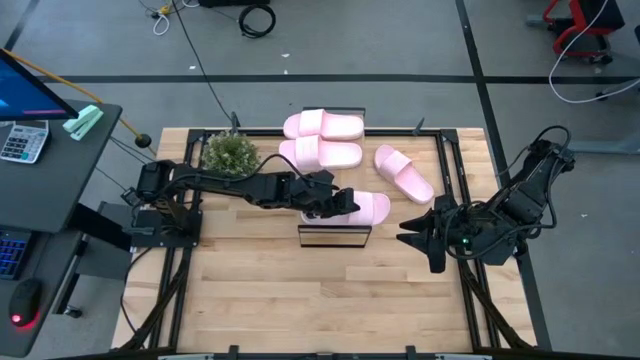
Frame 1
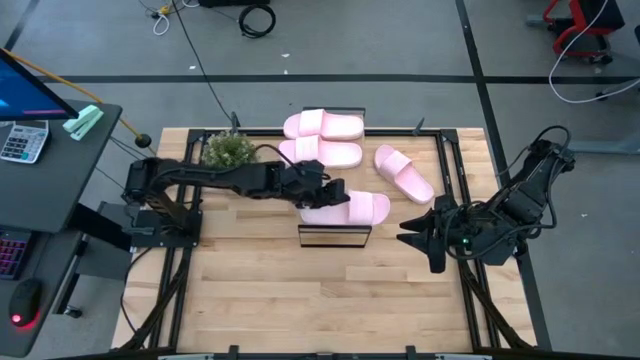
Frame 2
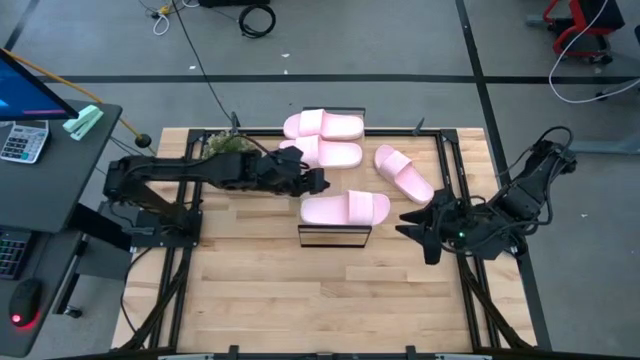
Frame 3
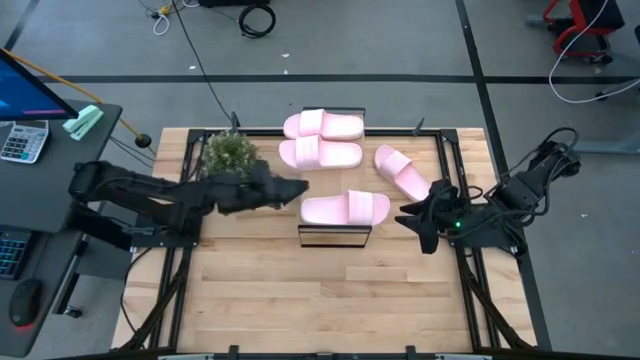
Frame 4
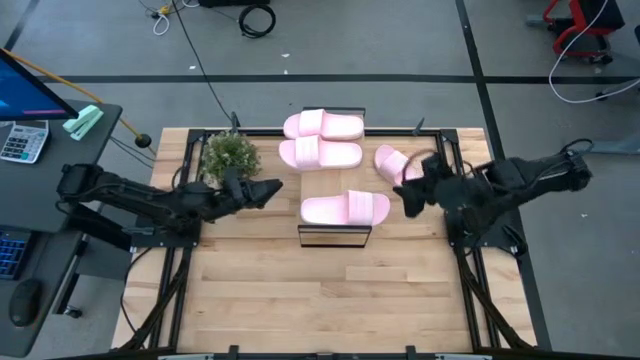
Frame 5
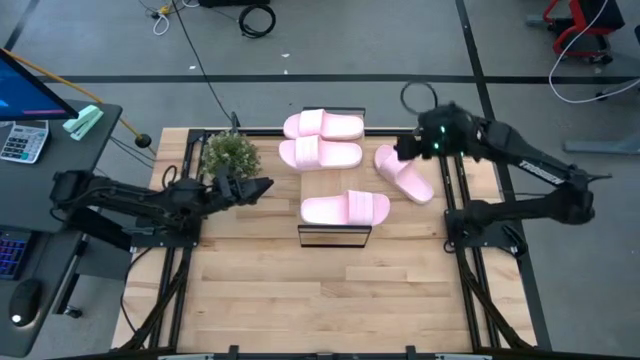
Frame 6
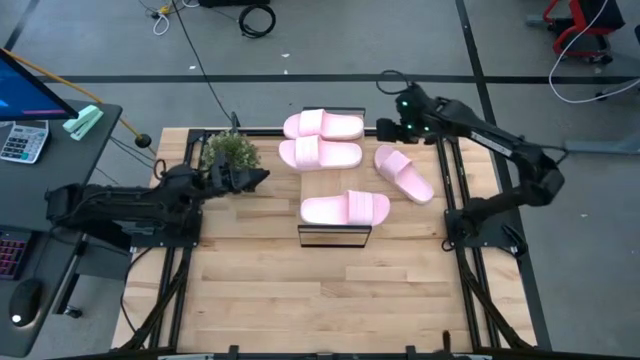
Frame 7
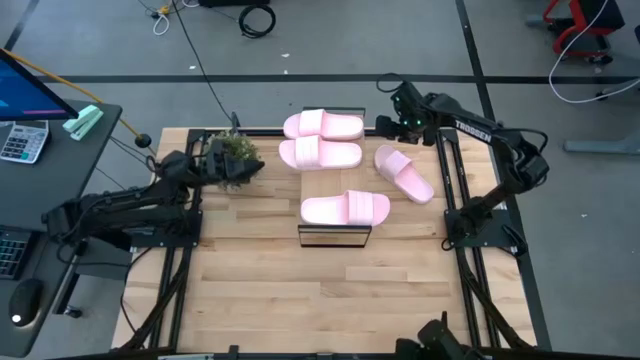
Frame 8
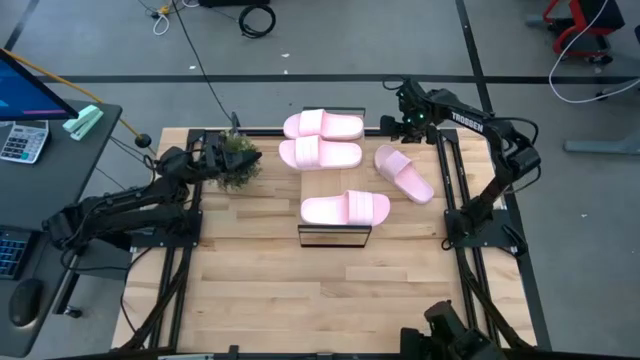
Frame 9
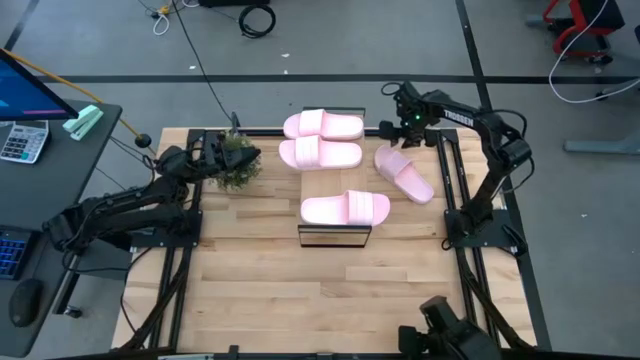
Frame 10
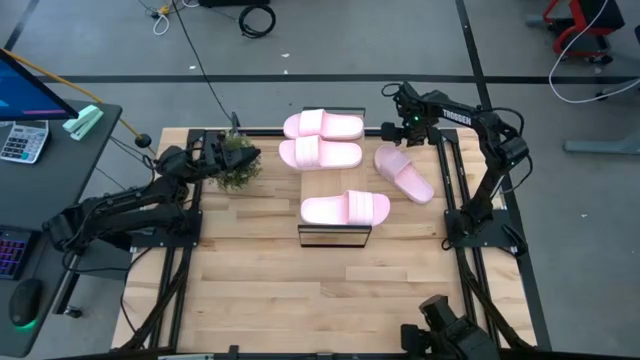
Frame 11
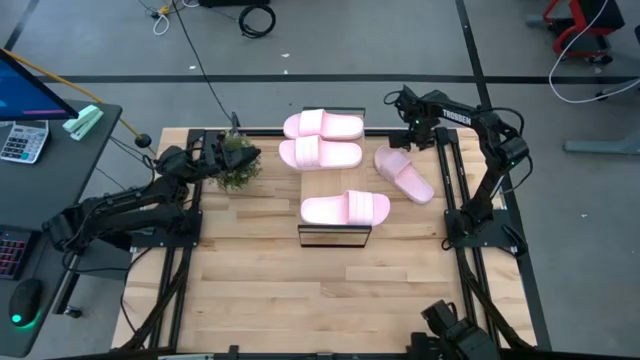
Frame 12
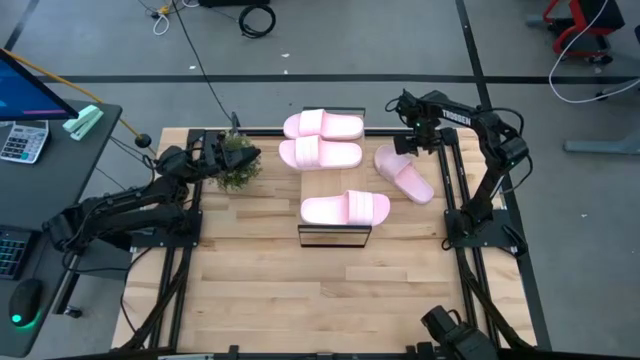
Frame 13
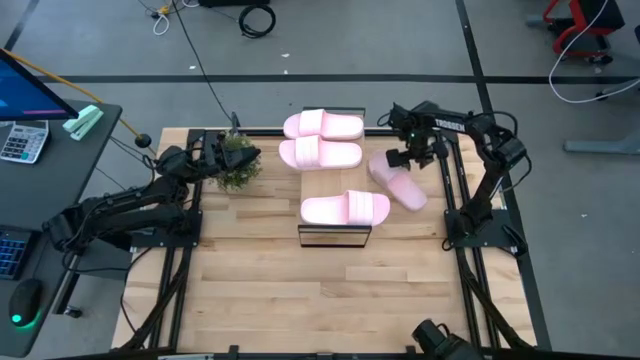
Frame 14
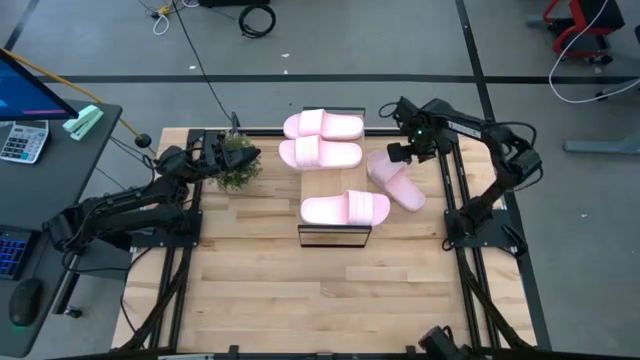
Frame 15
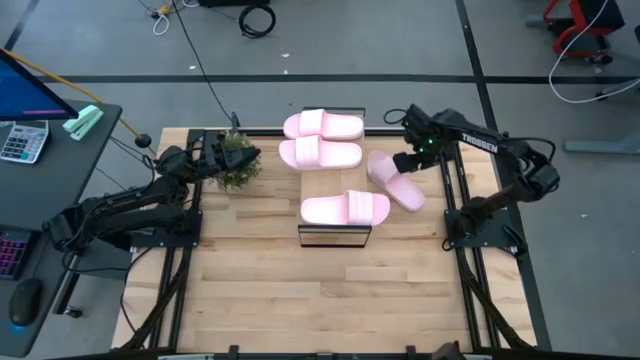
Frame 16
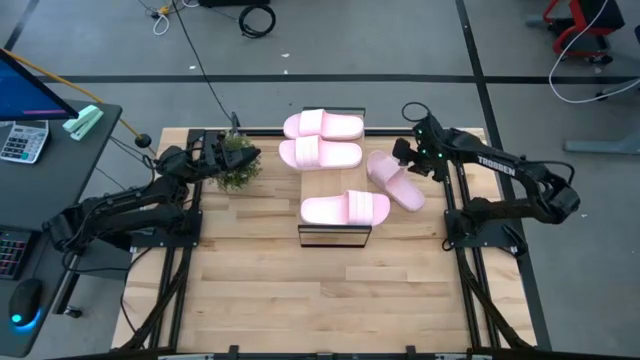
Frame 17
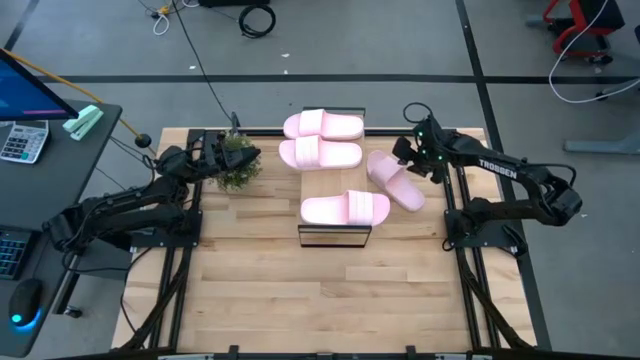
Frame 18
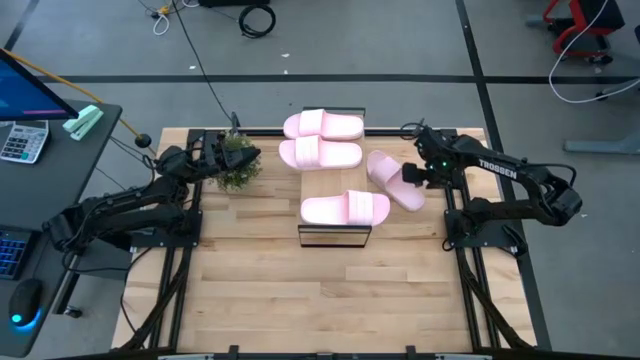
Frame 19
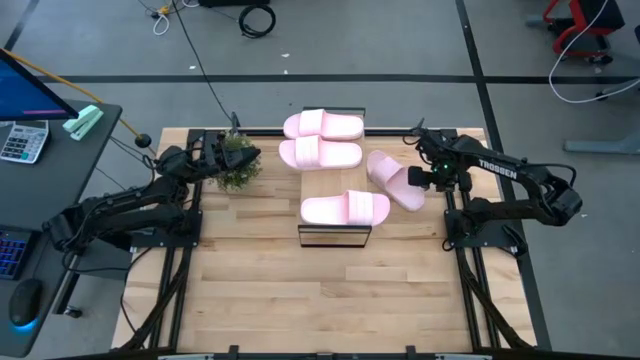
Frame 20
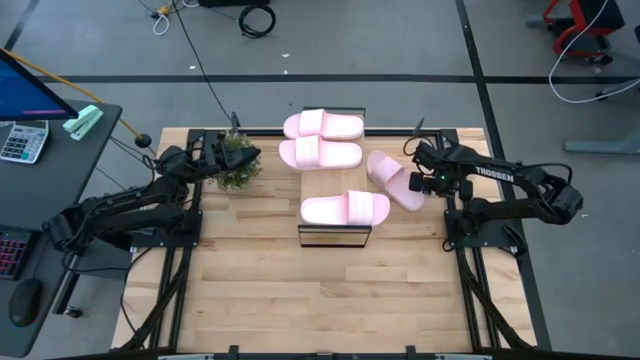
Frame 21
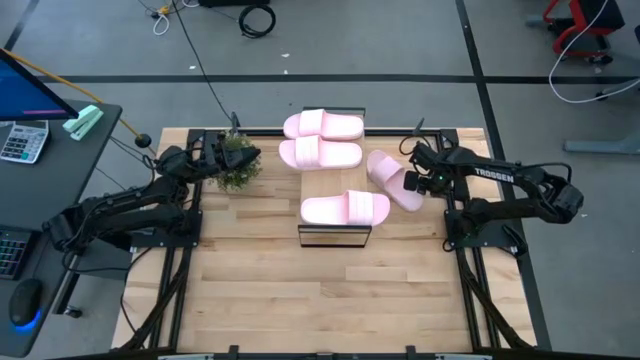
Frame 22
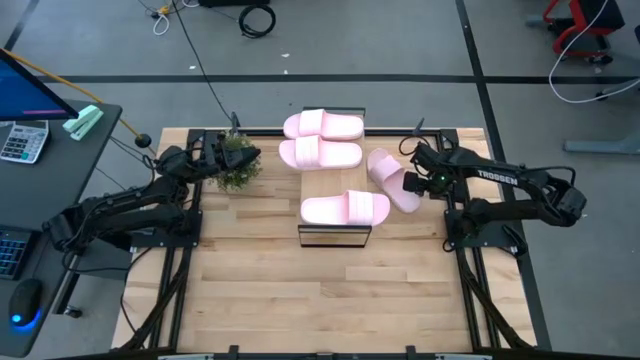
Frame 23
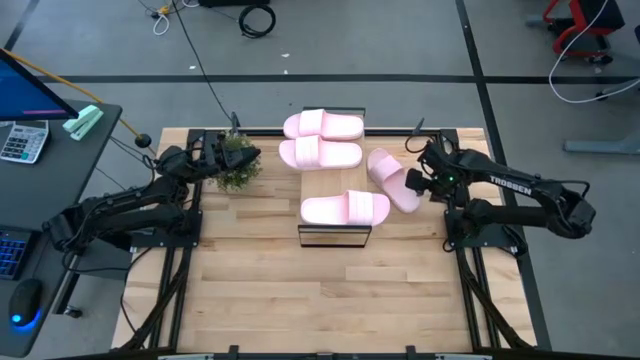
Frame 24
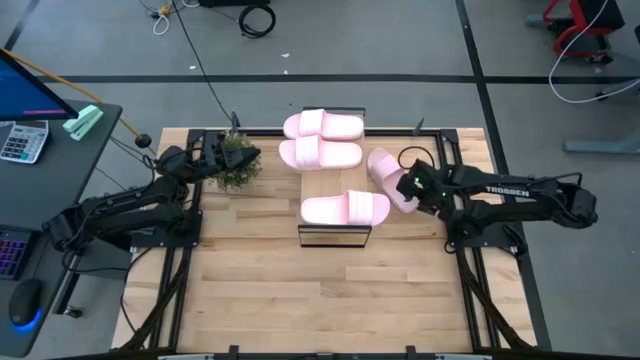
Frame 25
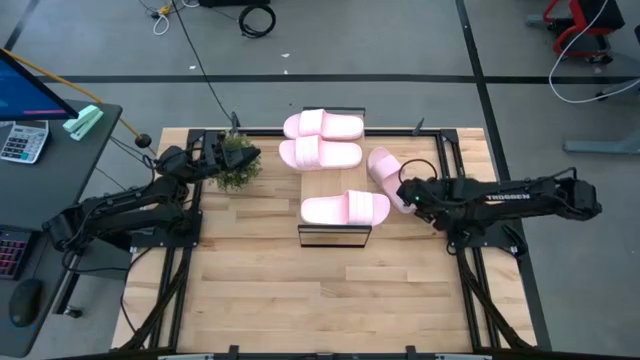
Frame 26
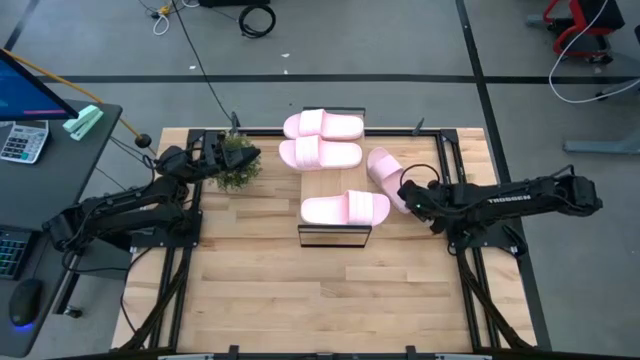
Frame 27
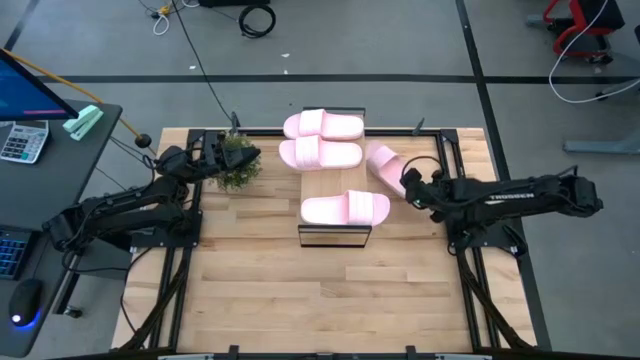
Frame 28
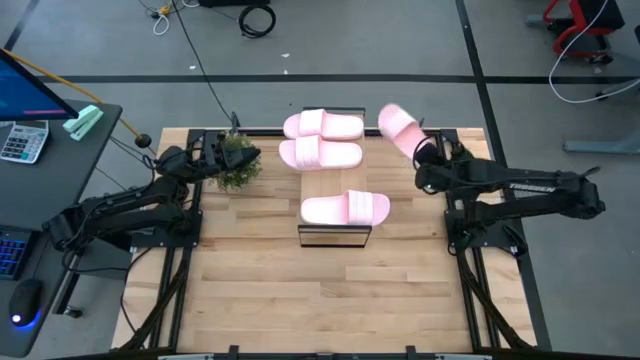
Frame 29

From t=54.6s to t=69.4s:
Task: Pick and place slides into the shelf
Put the pink slide on the shelf

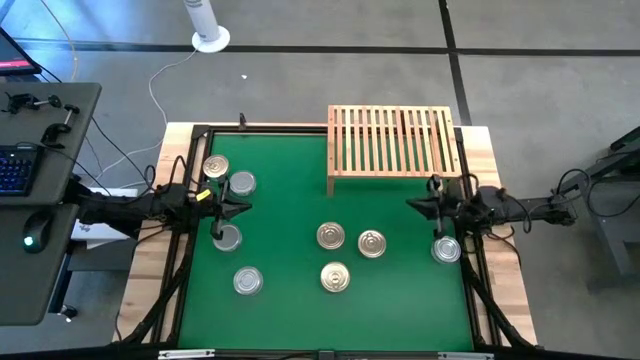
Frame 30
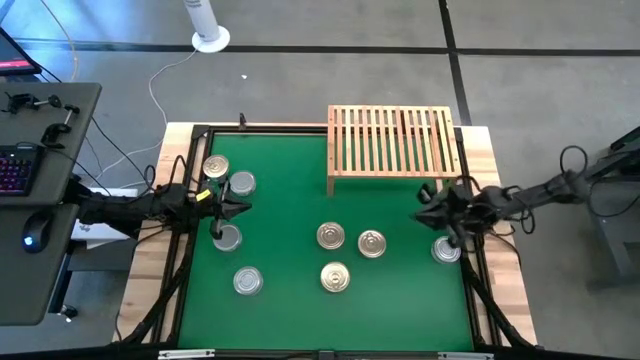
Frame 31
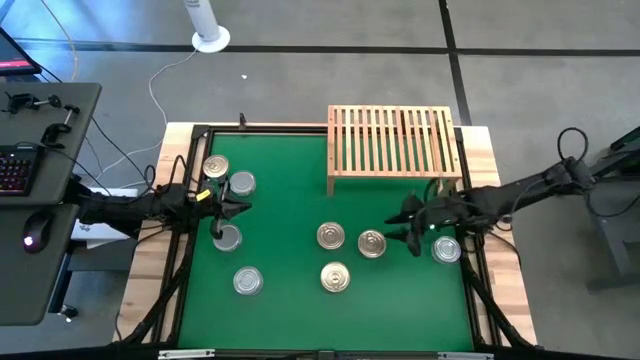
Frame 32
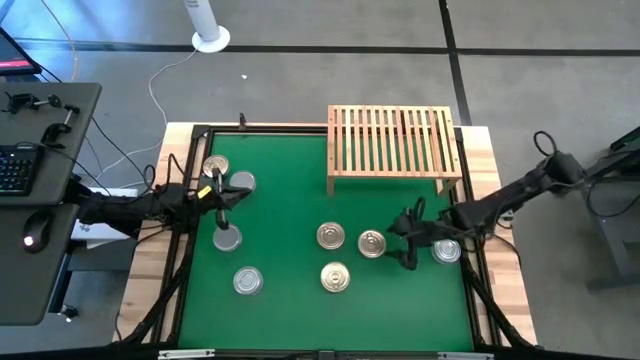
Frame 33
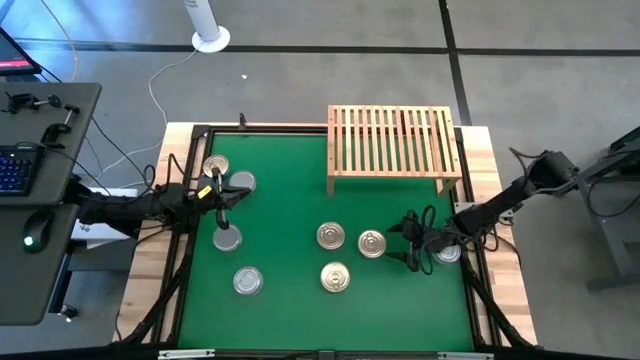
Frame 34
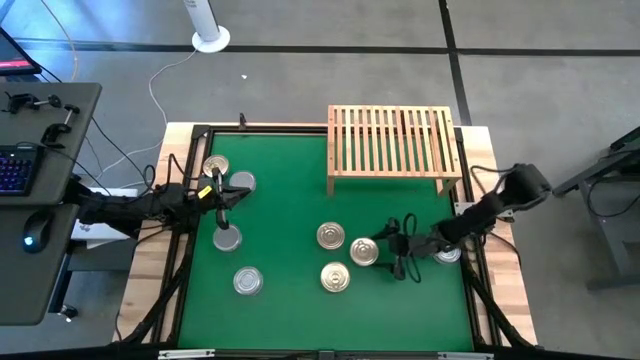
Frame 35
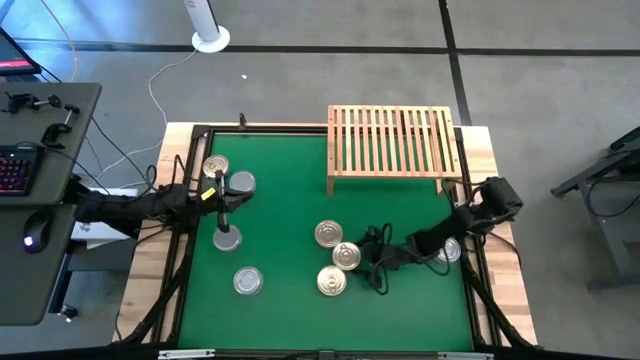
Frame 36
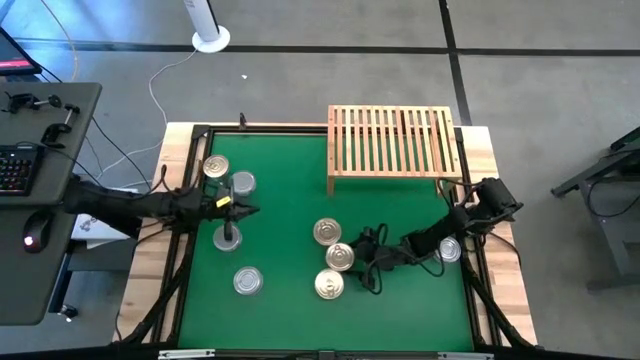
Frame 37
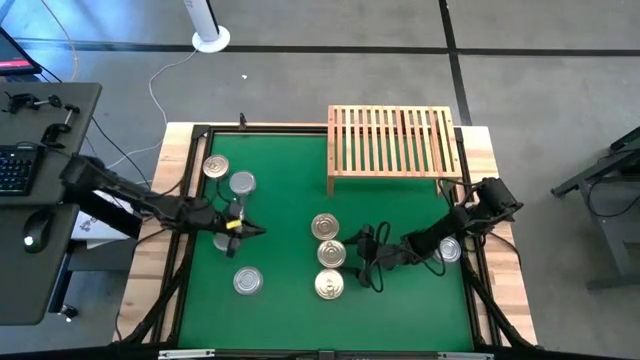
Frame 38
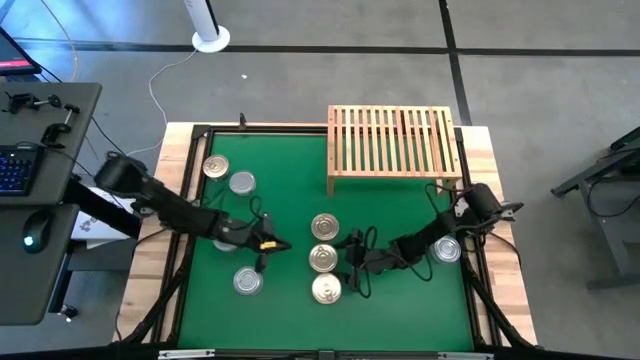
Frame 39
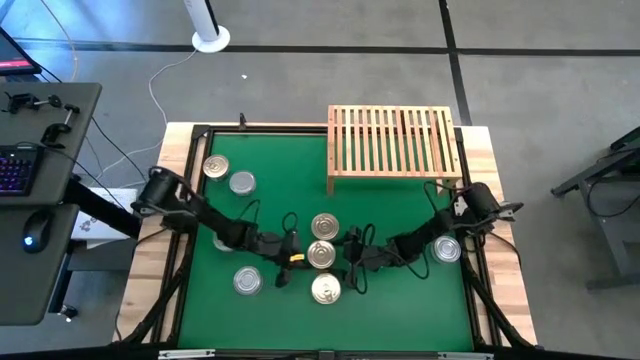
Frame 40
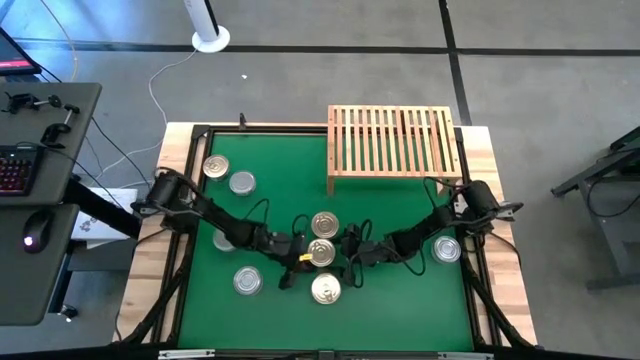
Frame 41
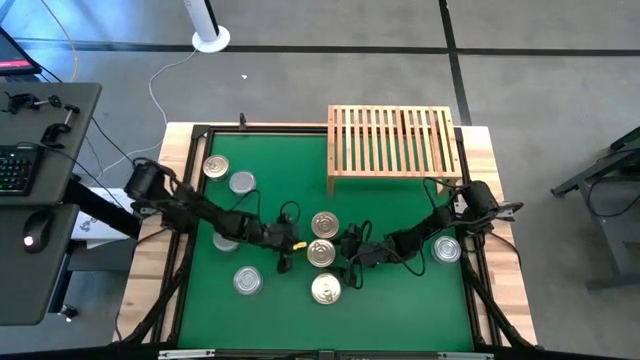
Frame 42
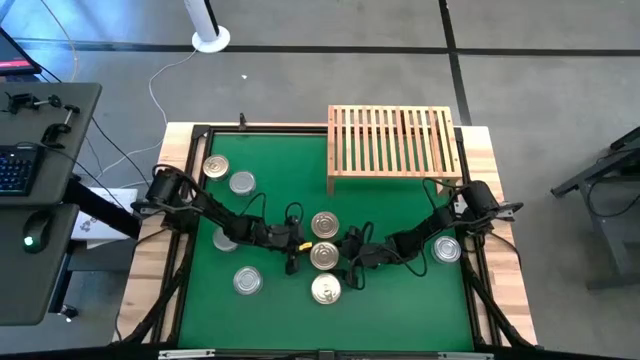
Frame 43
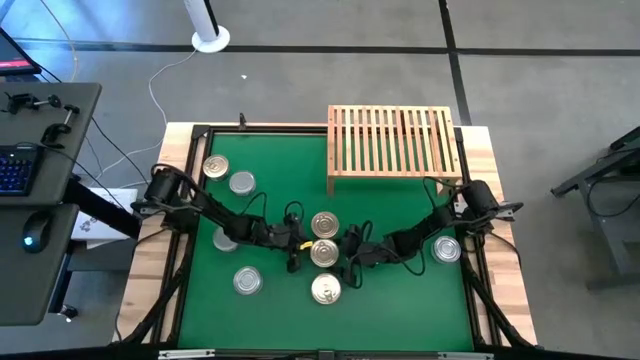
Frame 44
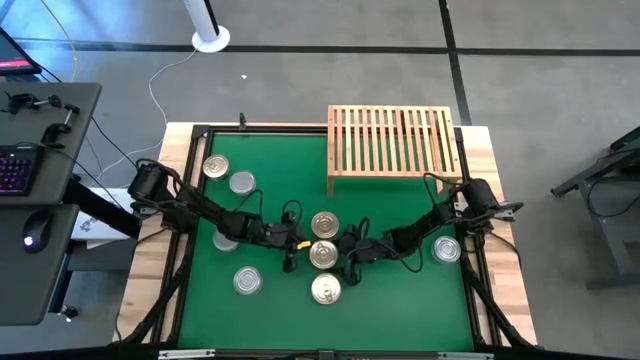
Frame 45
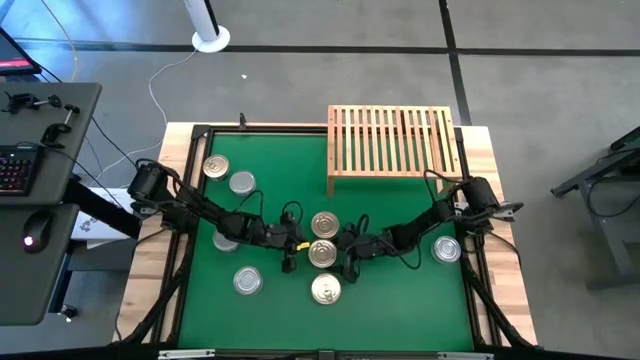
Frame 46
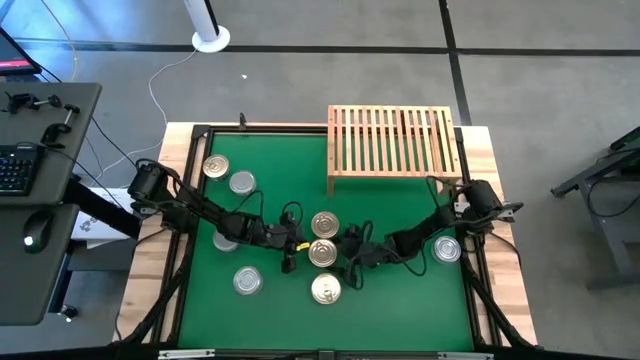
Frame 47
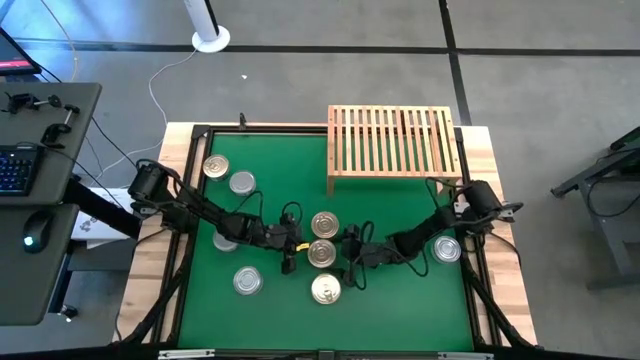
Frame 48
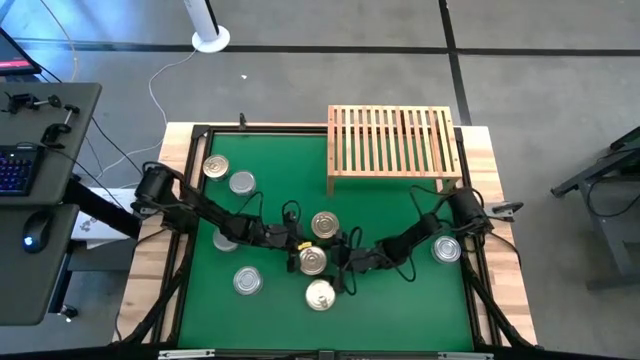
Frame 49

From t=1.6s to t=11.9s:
Task: Stack canned seafood by type on shelf
Put the blue pink tuna can on the shelf
